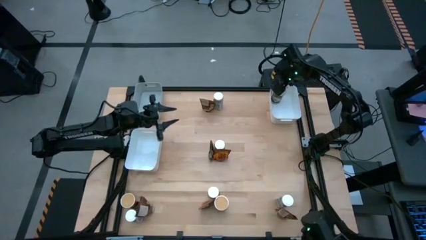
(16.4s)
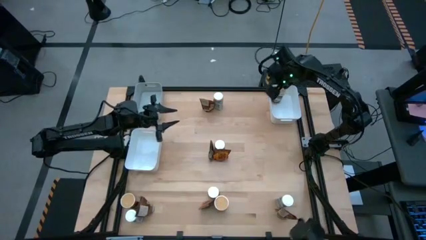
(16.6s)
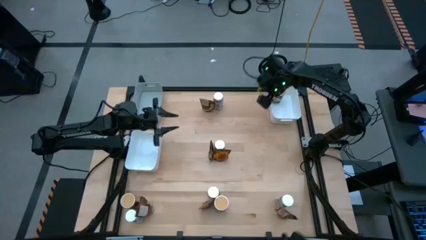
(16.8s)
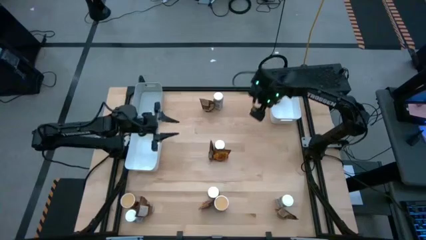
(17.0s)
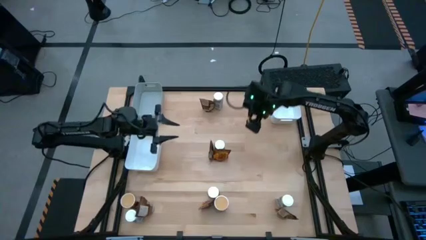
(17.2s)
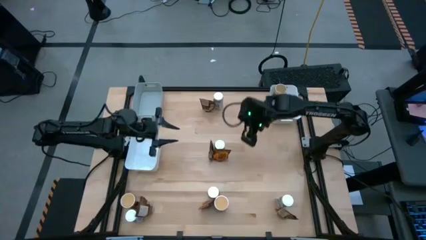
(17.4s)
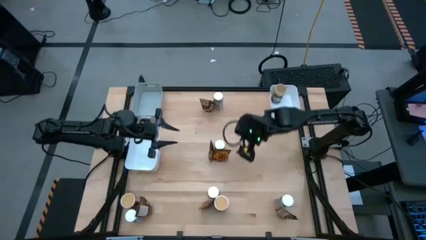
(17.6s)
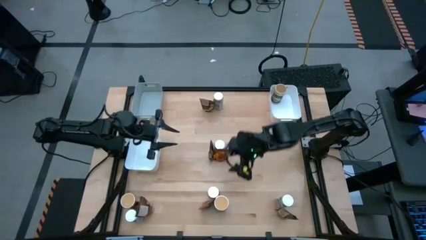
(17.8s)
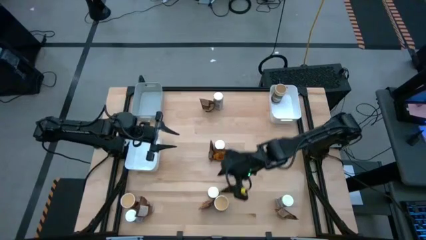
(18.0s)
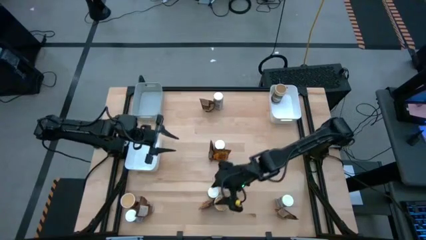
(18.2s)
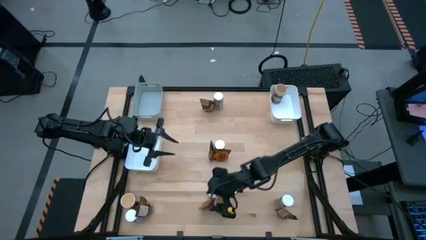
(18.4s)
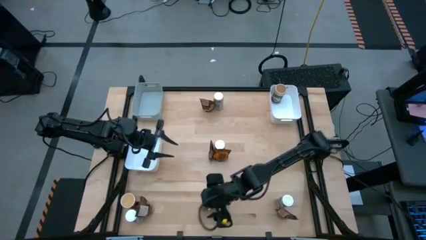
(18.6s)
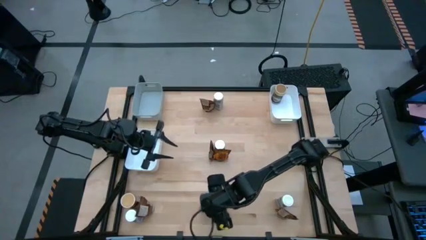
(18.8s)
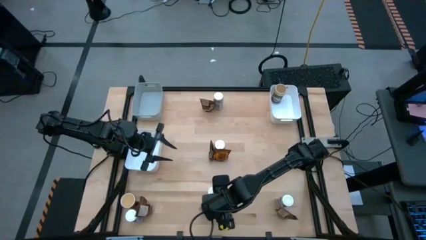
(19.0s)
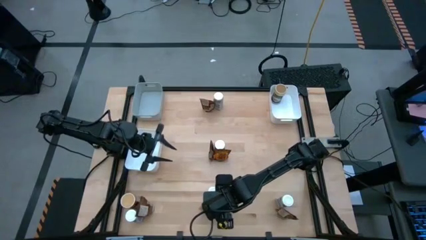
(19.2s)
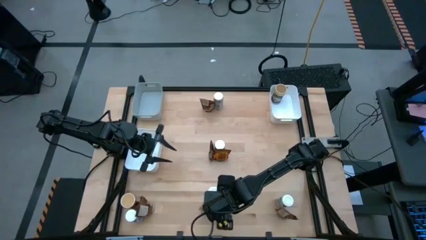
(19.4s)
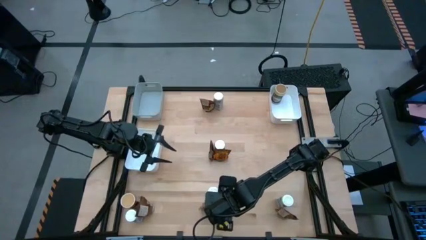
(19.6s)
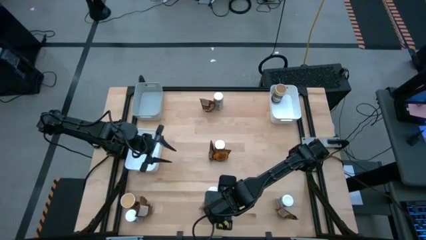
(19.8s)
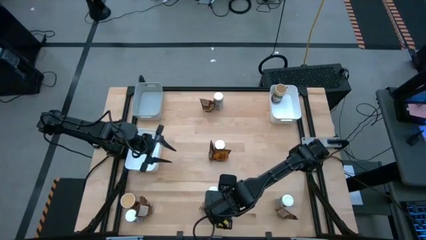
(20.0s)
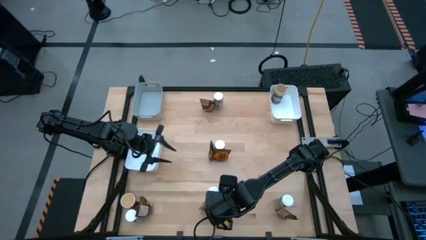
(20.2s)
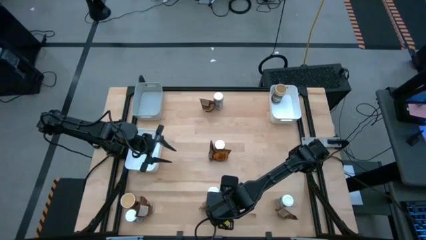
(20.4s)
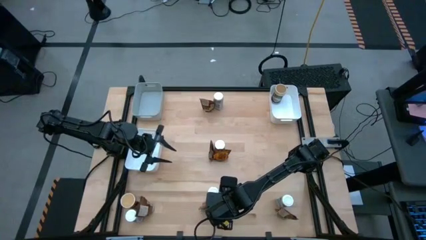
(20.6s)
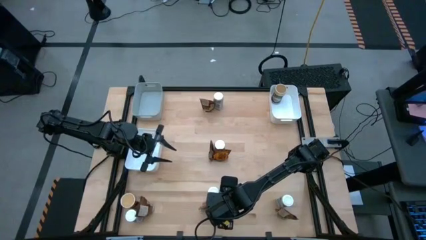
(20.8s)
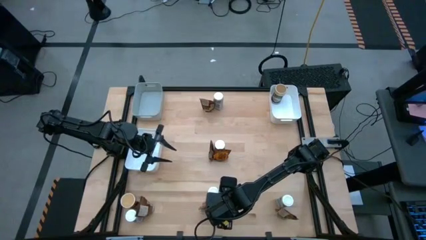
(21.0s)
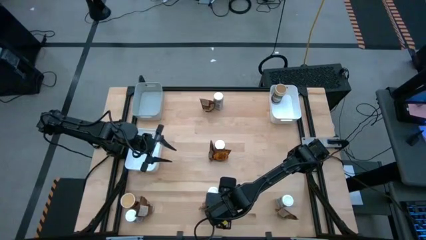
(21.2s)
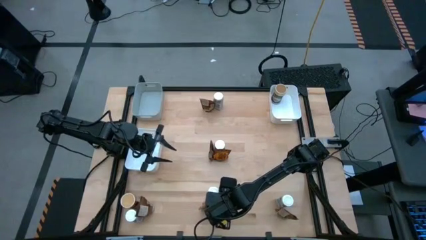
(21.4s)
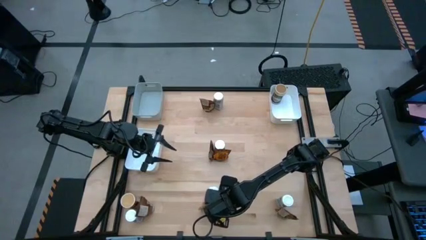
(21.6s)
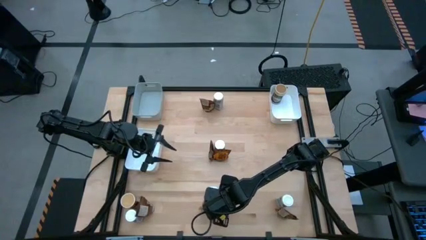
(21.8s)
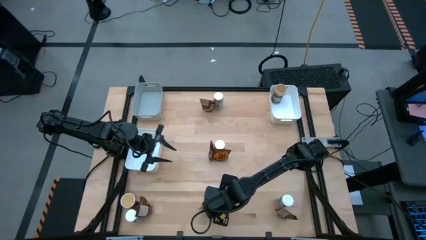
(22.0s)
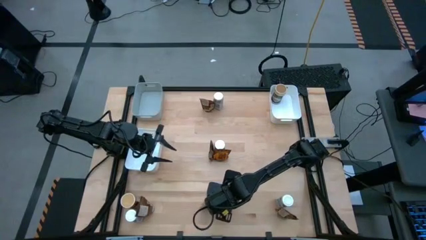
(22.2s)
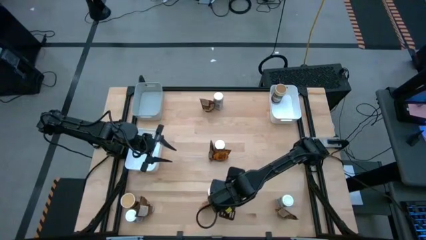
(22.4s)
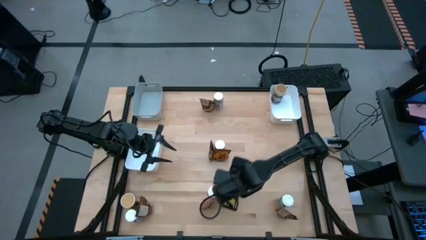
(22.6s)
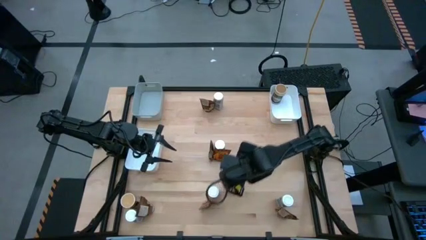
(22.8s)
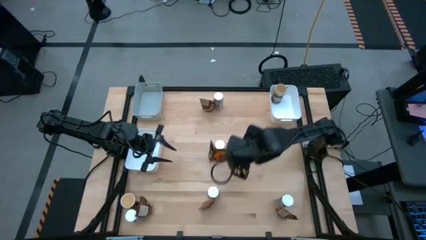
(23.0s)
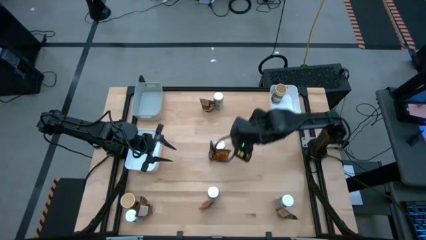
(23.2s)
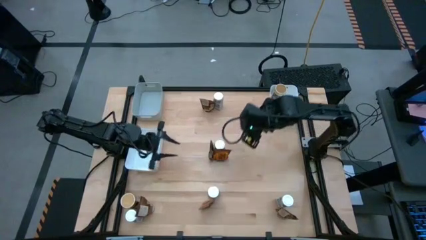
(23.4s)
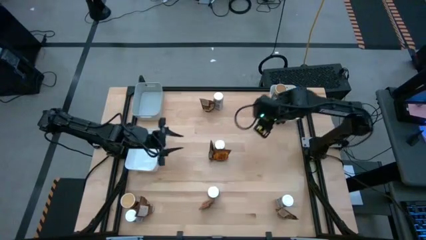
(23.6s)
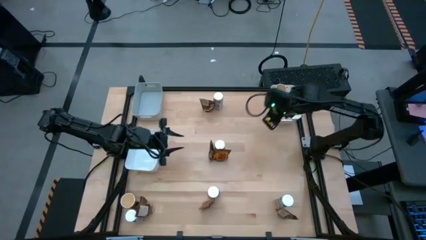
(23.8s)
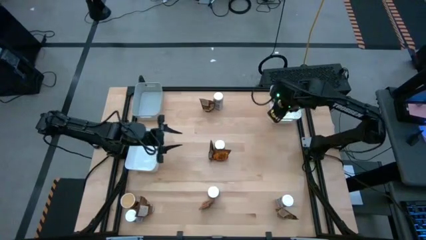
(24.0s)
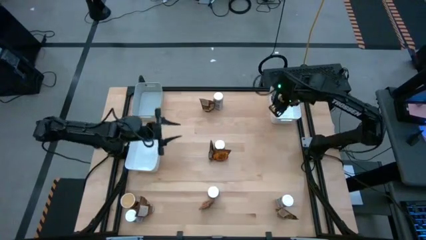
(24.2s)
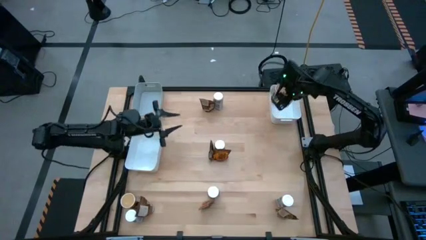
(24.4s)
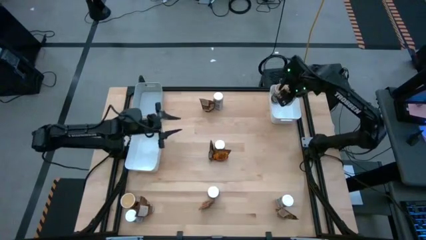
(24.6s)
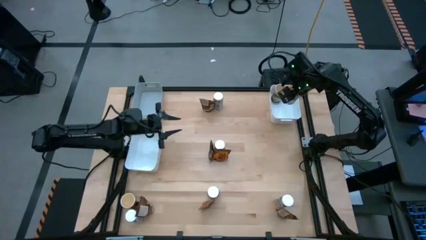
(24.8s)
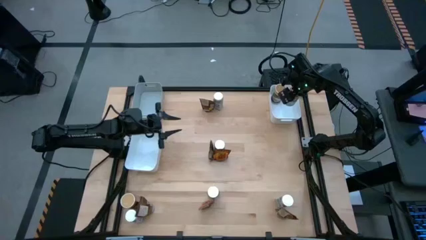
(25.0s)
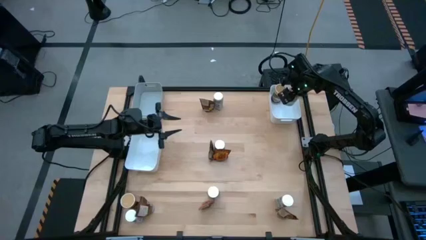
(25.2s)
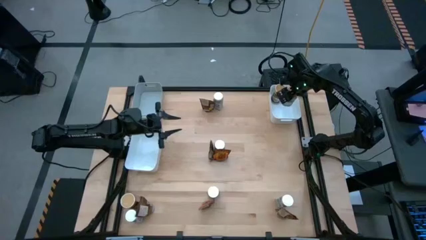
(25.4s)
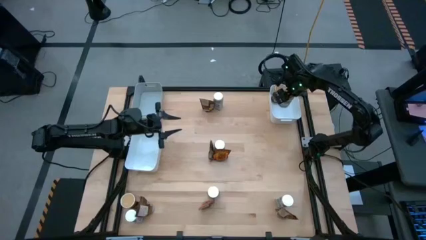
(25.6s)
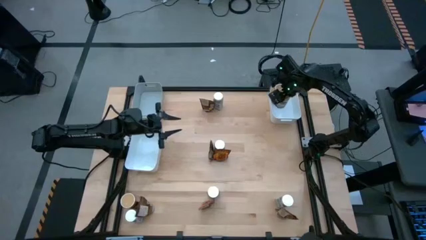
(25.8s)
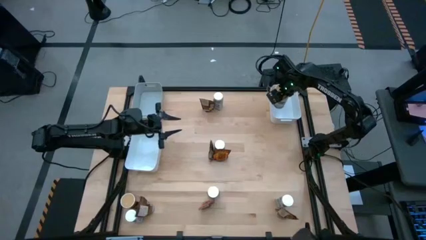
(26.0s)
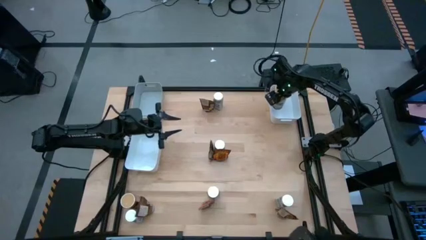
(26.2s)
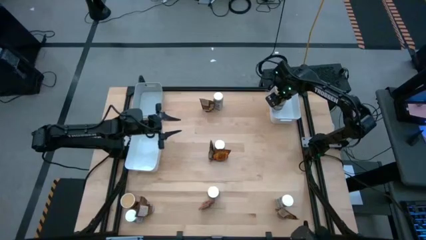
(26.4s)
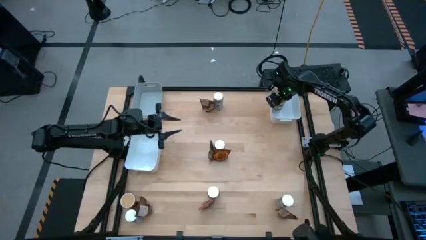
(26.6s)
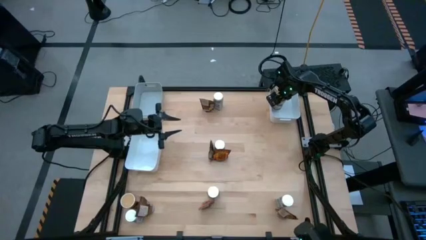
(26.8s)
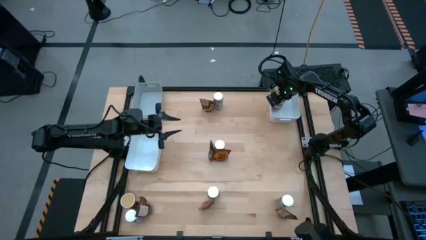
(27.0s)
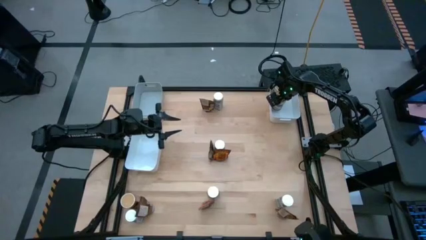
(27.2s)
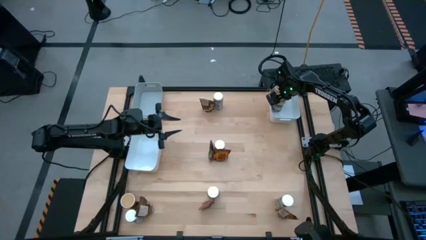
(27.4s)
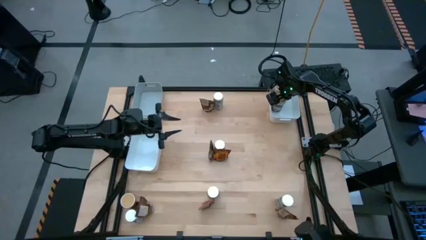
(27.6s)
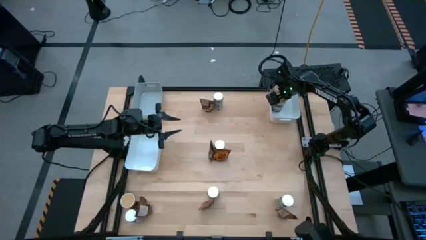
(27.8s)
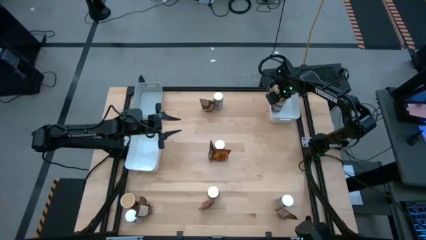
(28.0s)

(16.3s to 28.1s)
Task: Sort spices by type
Put the right gold seasoning bottle into the right white bin
